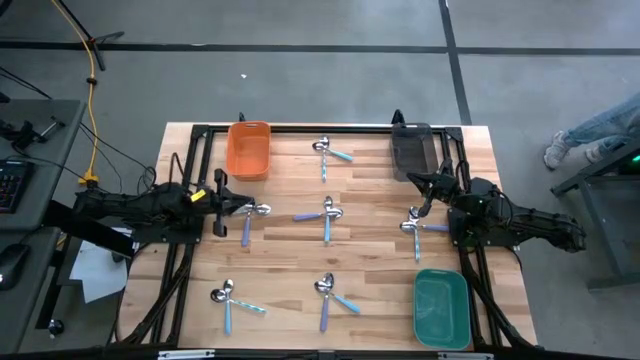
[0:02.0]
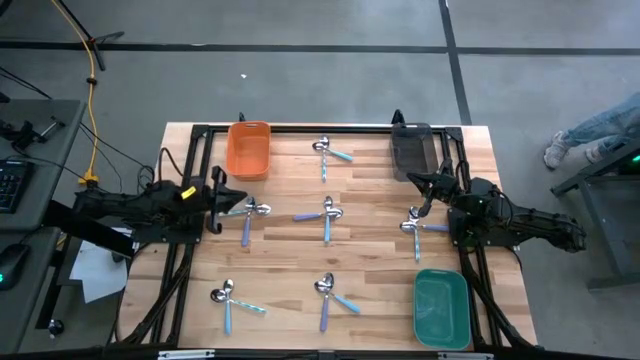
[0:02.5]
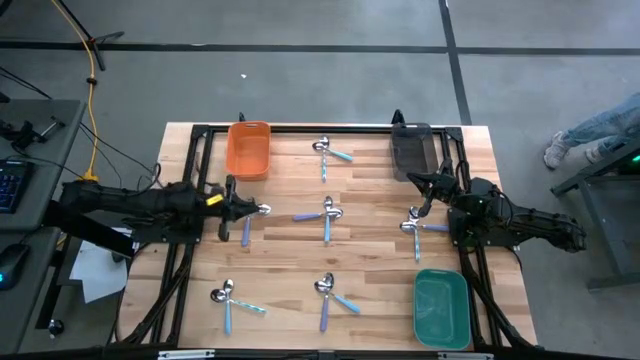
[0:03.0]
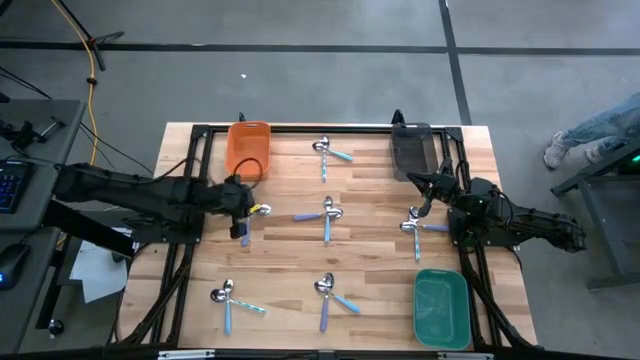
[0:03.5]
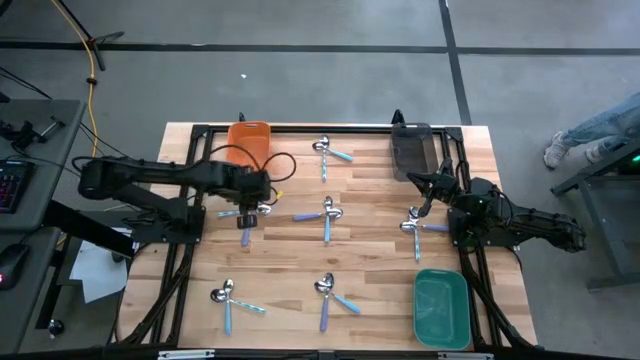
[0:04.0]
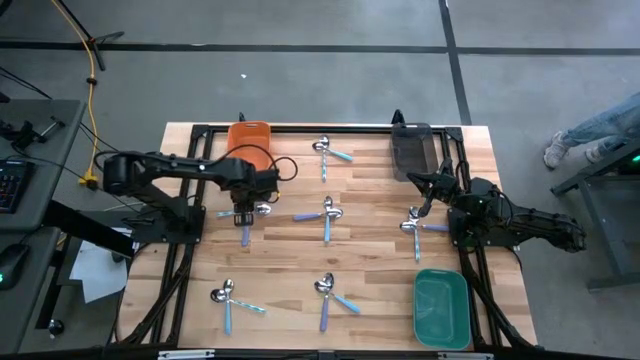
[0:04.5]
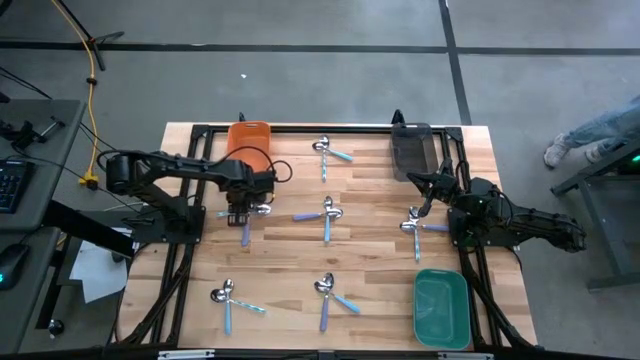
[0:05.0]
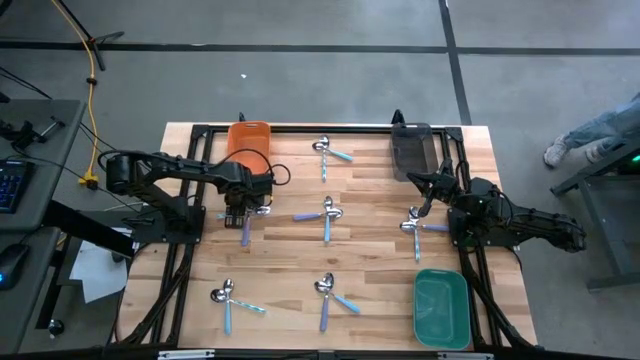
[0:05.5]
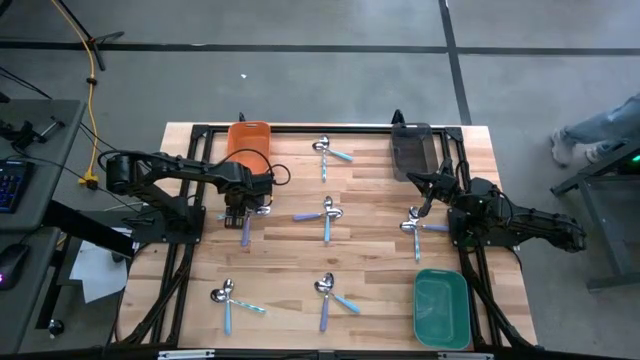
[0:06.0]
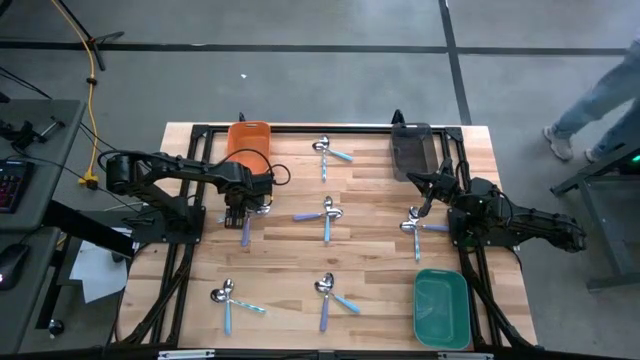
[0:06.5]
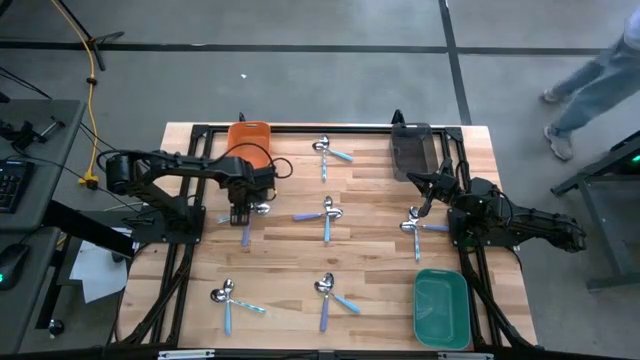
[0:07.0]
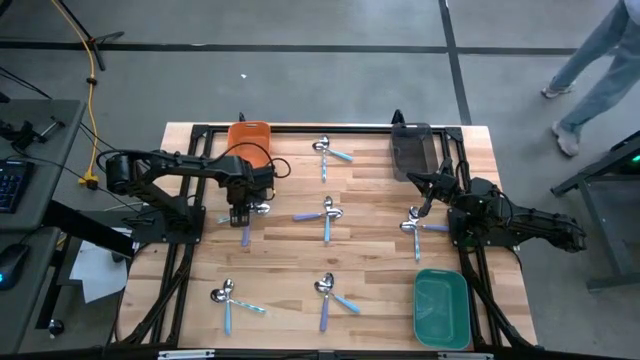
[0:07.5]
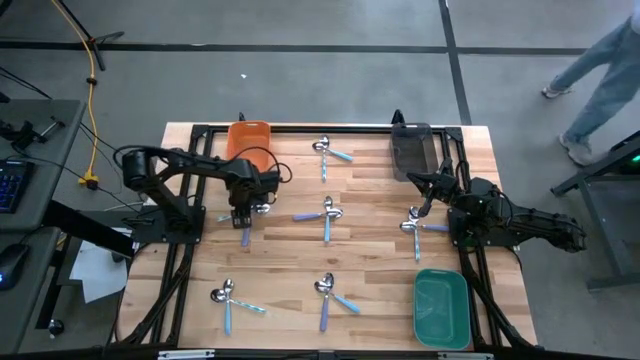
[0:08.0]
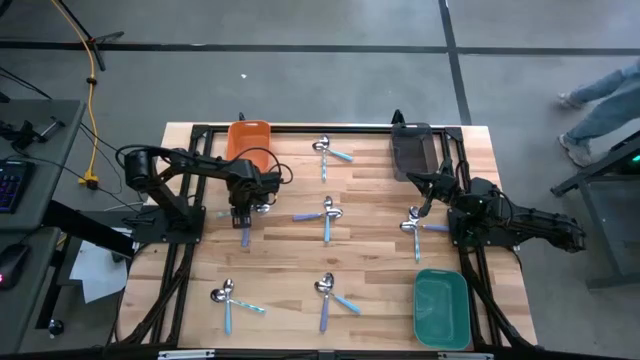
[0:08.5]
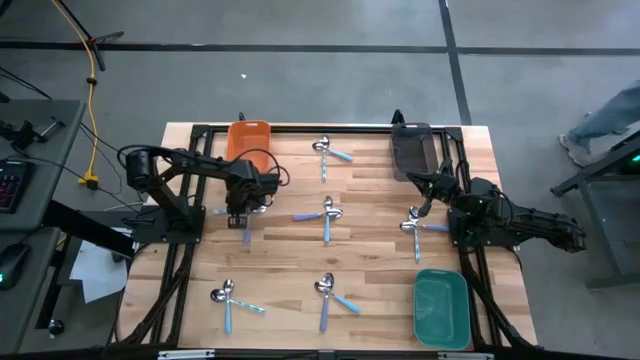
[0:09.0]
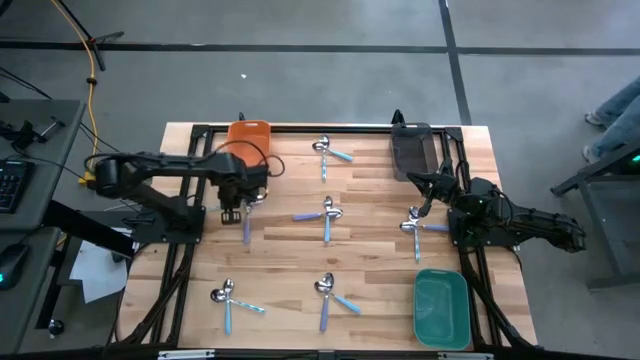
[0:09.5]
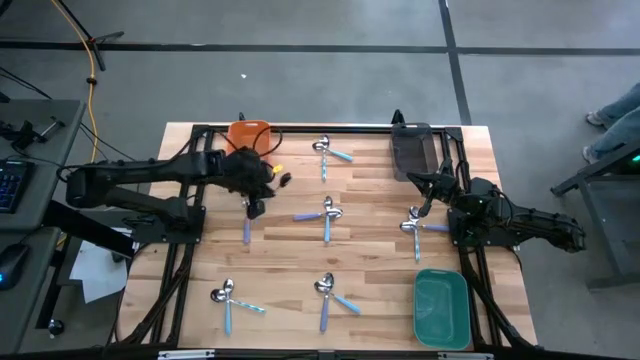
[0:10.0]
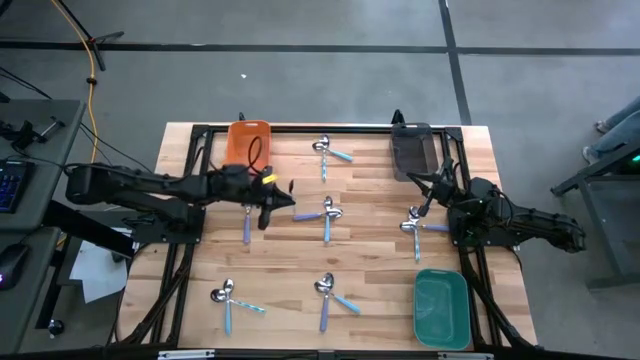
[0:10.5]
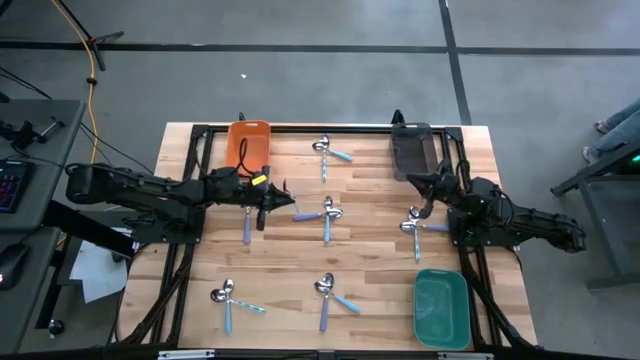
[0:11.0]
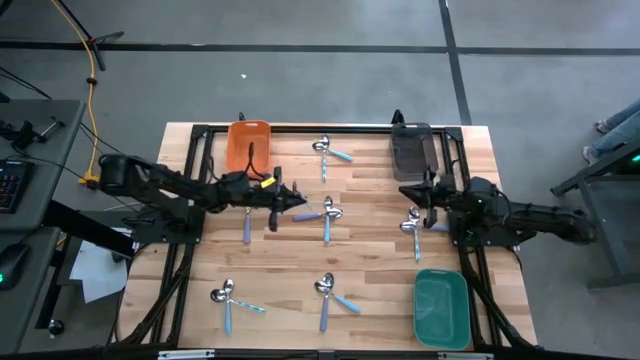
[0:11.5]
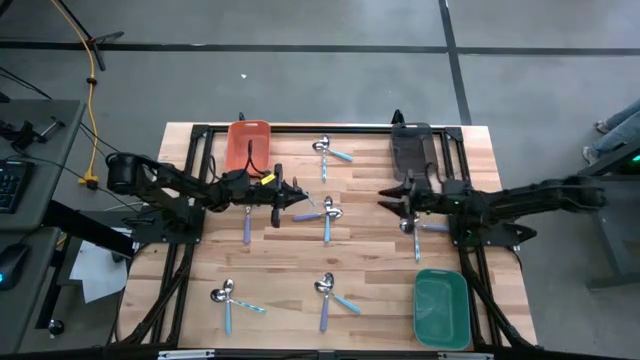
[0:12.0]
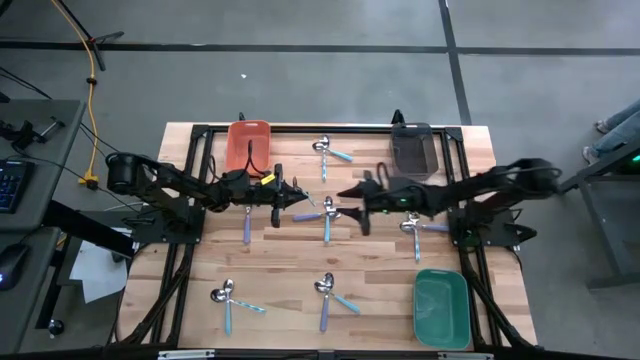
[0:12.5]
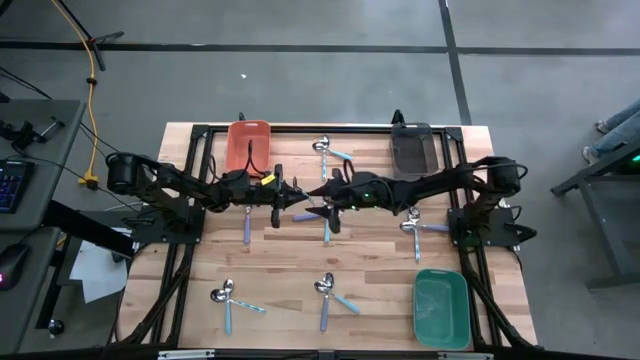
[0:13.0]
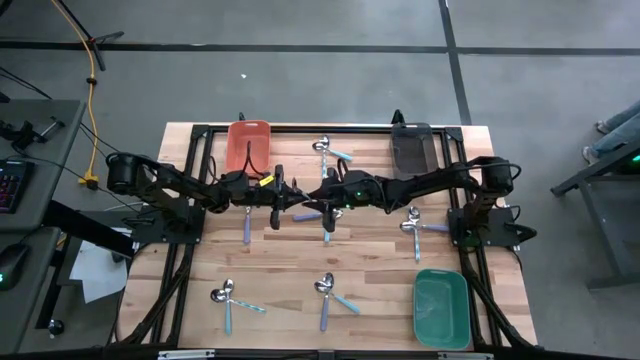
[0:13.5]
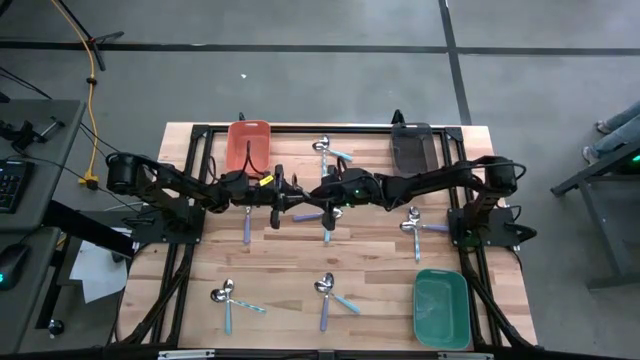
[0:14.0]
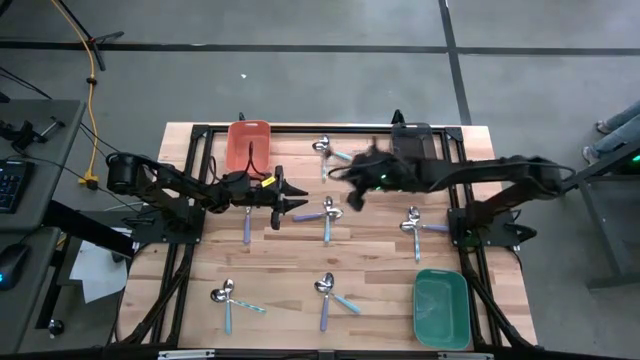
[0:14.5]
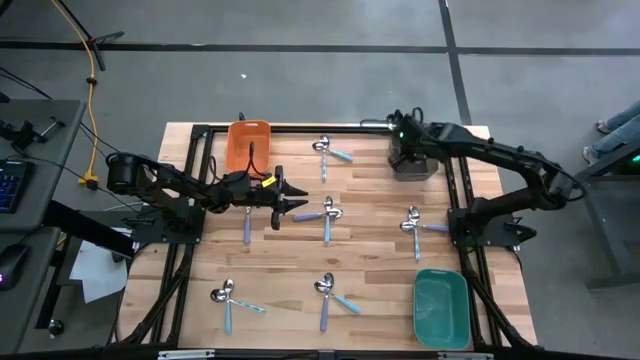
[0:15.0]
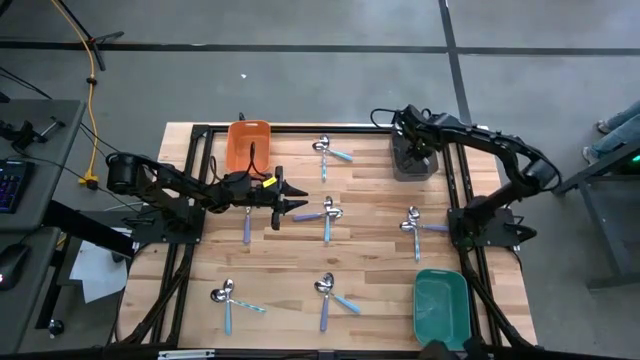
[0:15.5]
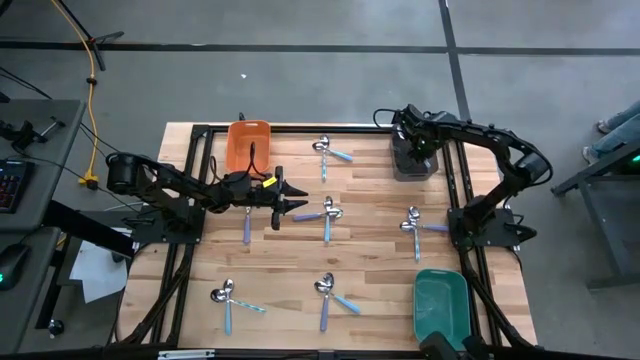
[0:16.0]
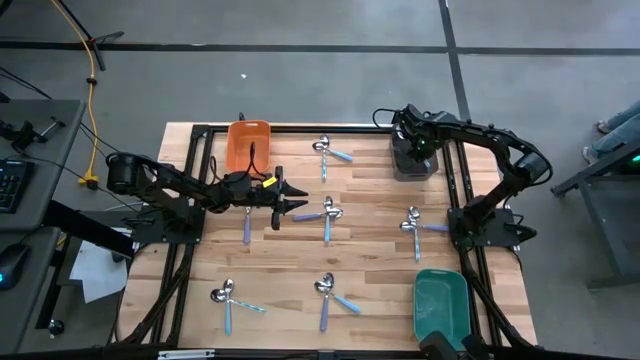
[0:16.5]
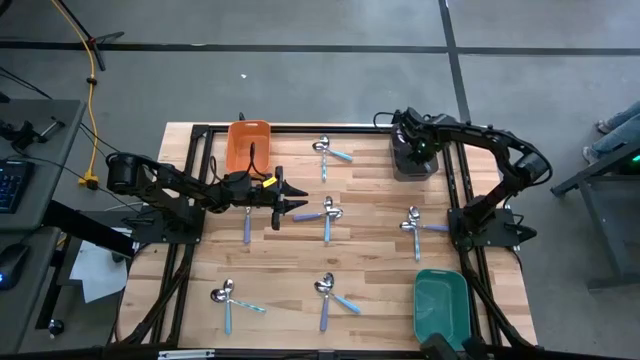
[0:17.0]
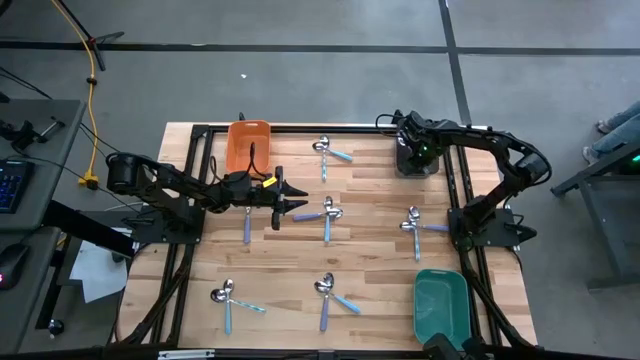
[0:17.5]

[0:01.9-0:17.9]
Task: Sort silverware by color (type)
Put the white patterned spoon into the black bin

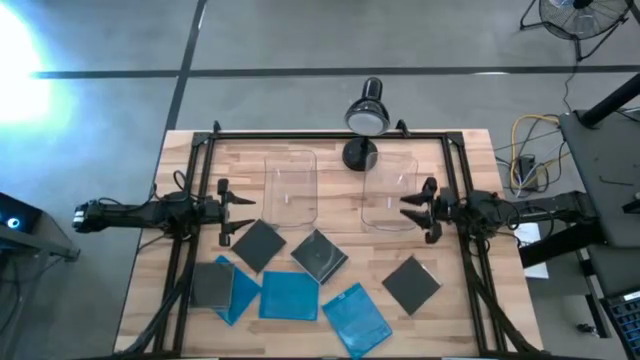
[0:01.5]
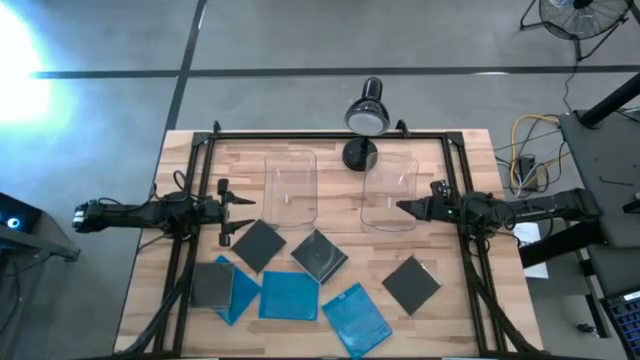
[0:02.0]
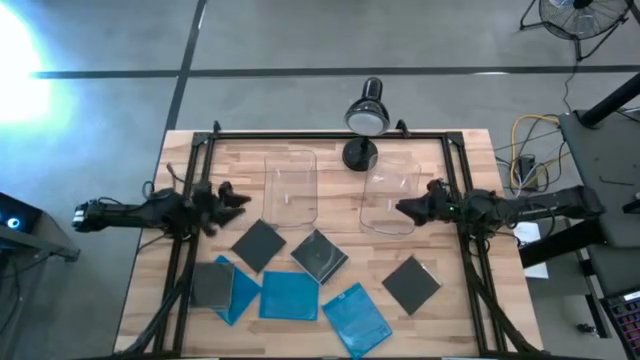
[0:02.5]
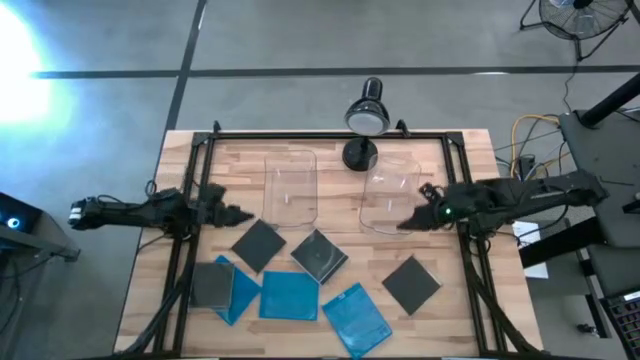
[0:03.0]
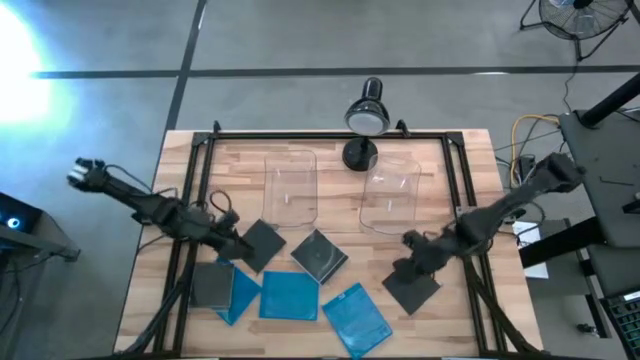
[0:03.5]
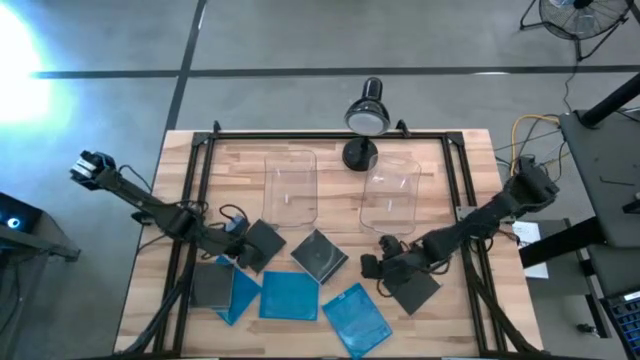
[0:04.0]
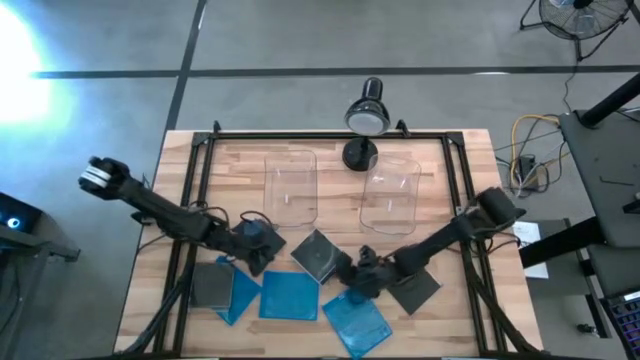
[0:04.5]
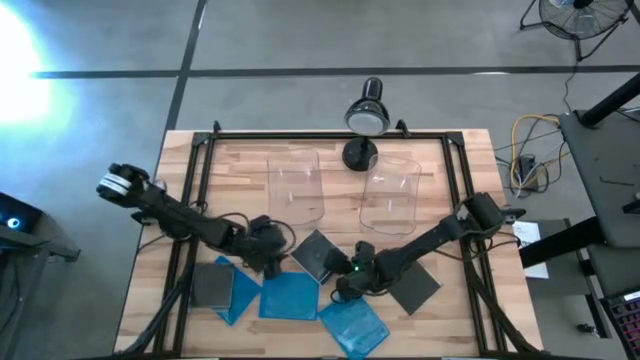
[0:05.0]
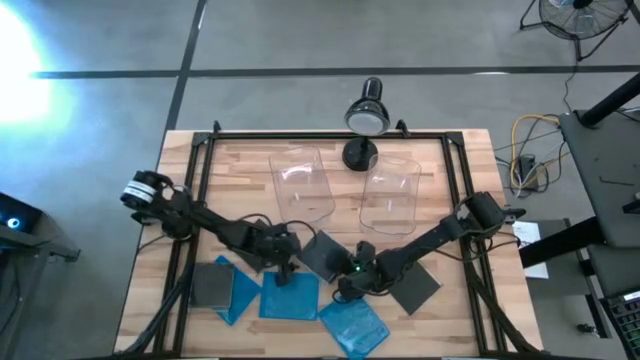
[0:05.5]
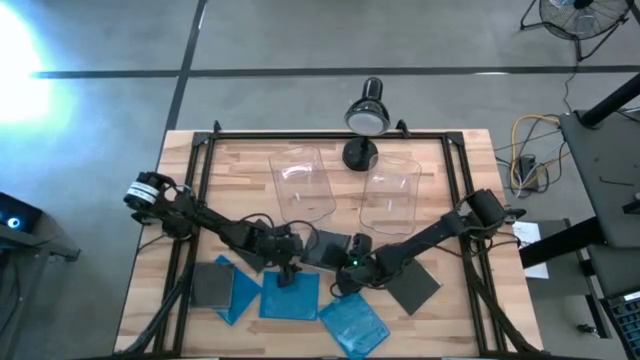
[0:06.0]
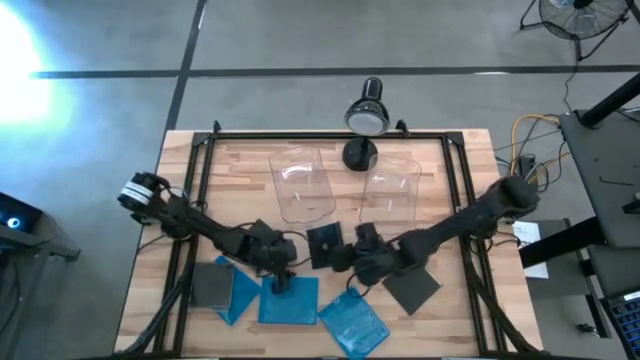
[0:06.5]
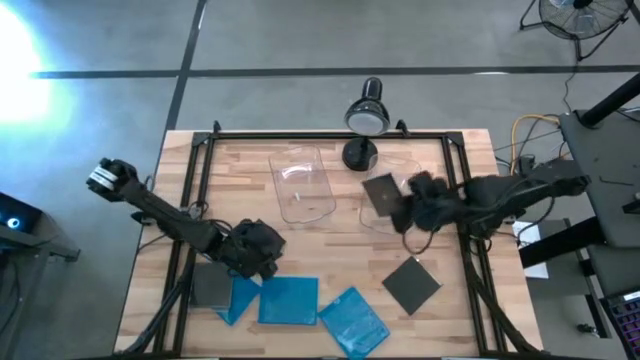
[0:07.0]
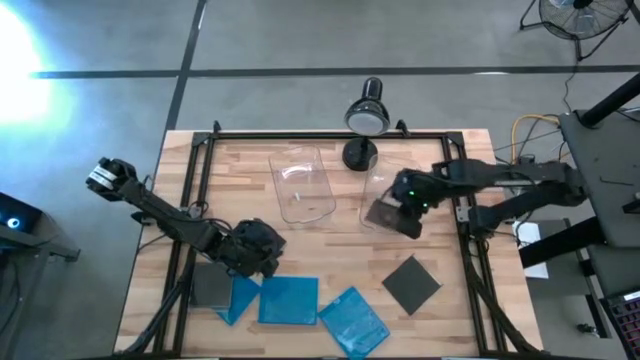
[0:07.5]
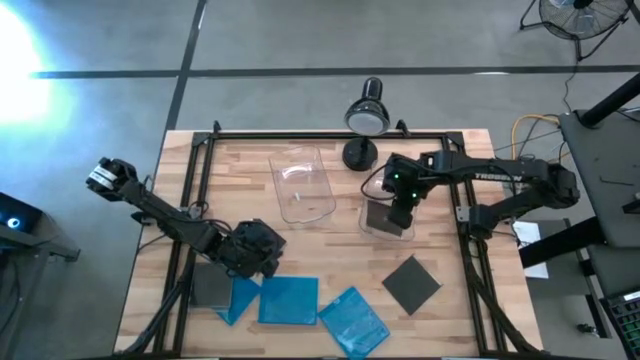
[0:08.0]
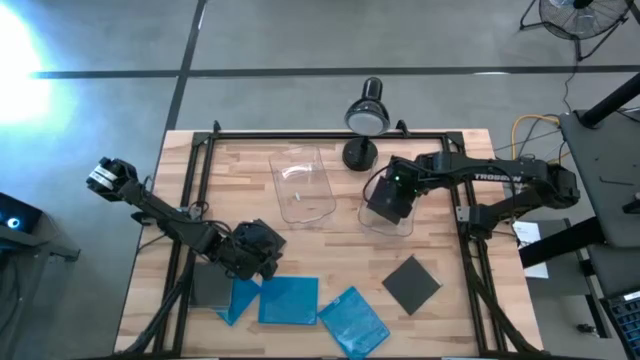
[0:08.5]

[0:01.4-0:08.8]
Task: Pick & place jewel cases by type
Put the black CD case into the right transparent bin
